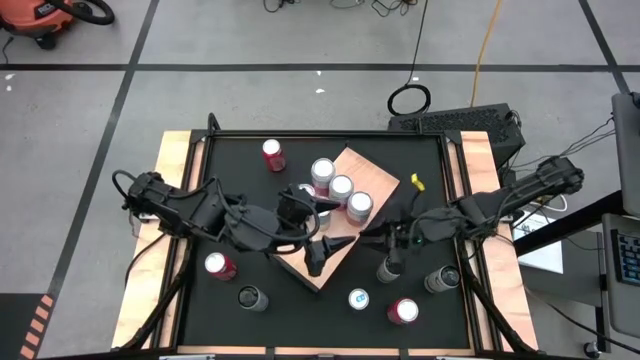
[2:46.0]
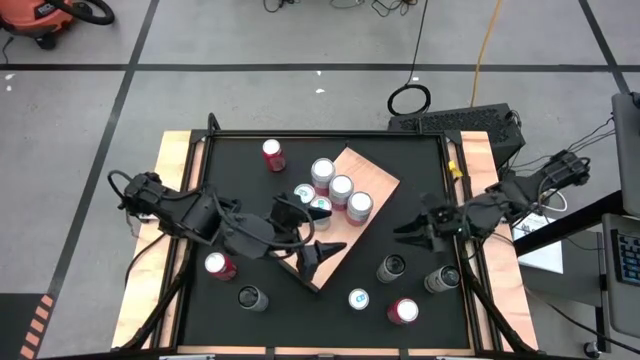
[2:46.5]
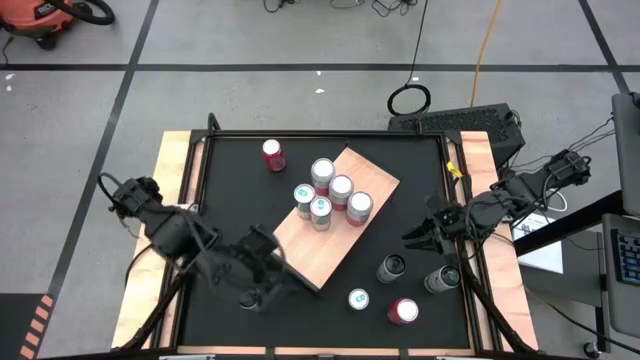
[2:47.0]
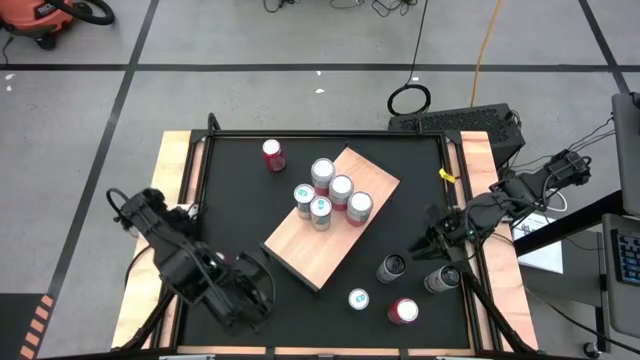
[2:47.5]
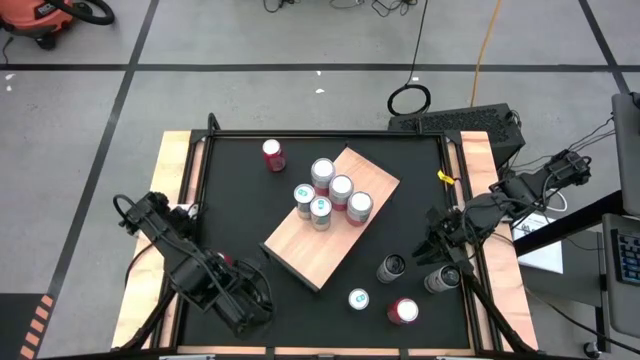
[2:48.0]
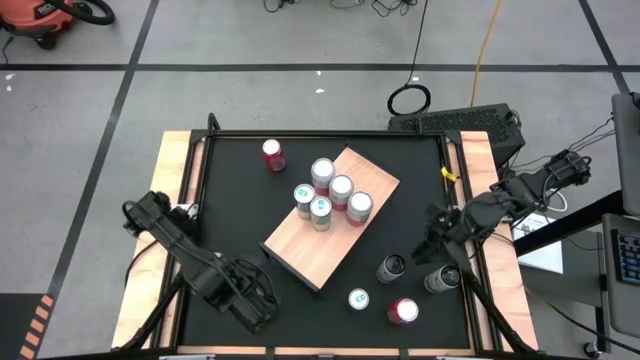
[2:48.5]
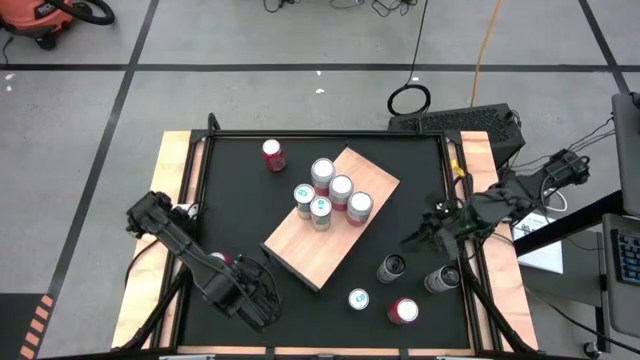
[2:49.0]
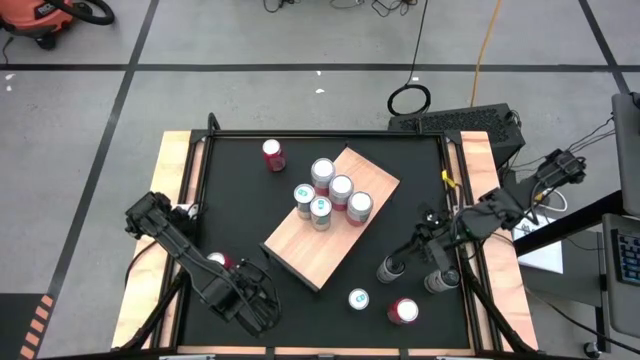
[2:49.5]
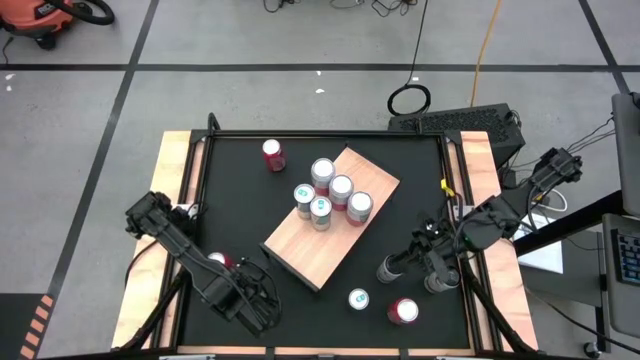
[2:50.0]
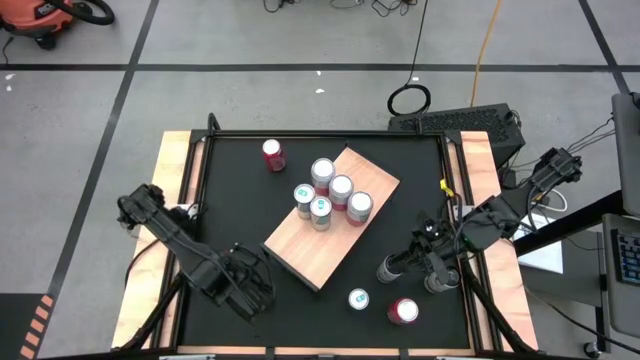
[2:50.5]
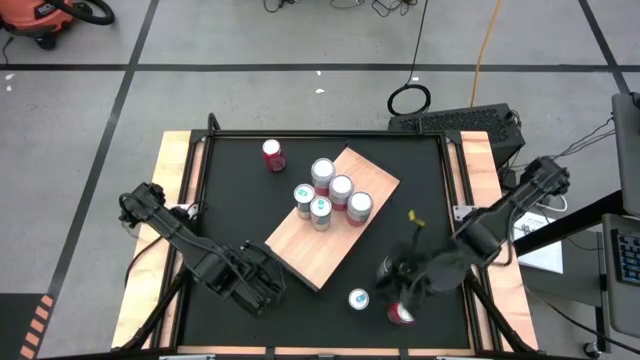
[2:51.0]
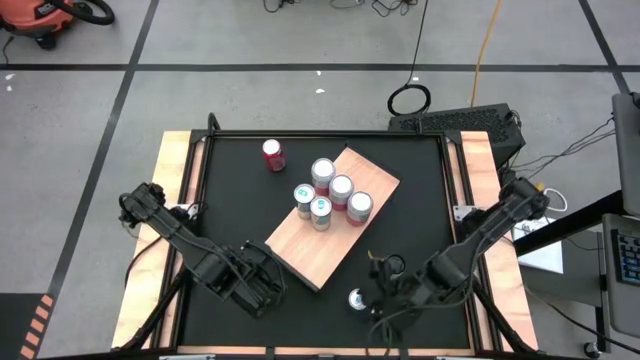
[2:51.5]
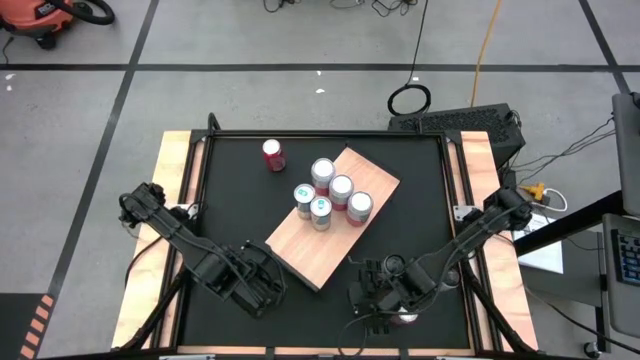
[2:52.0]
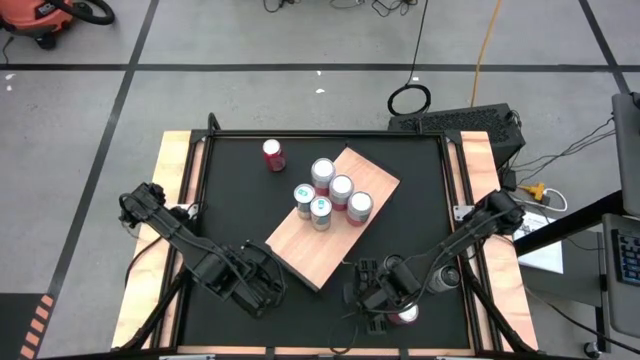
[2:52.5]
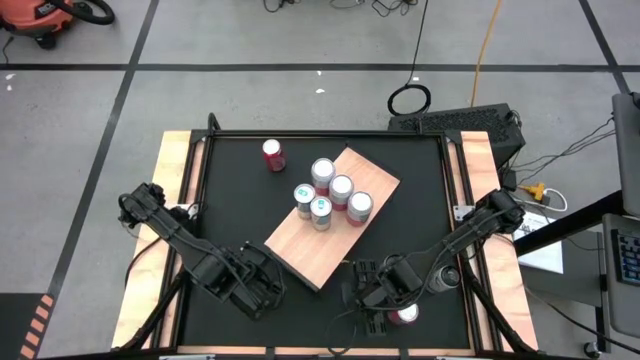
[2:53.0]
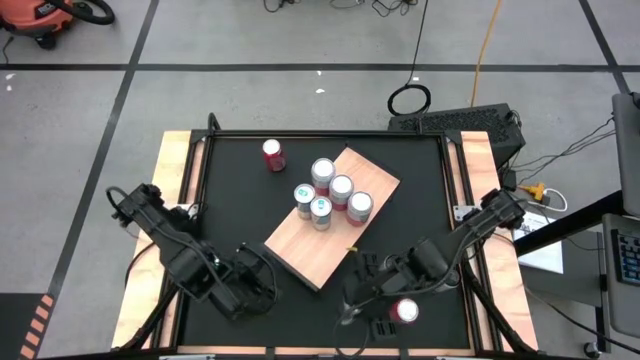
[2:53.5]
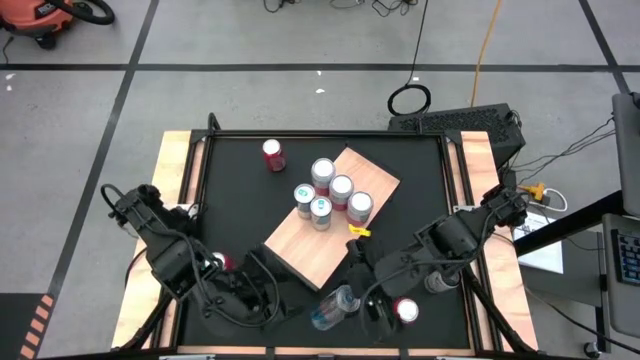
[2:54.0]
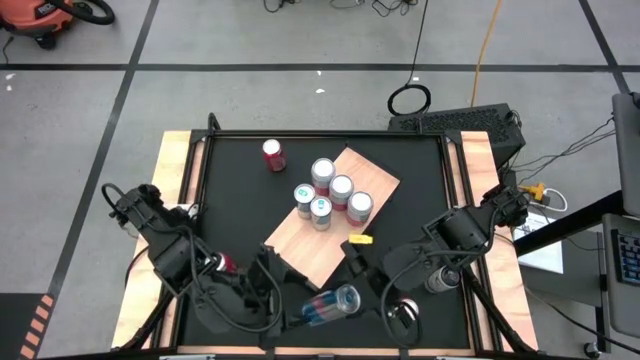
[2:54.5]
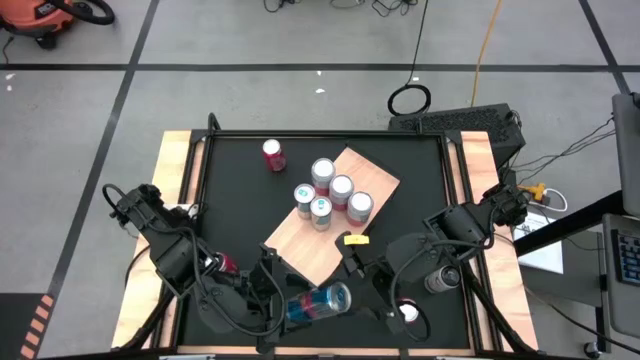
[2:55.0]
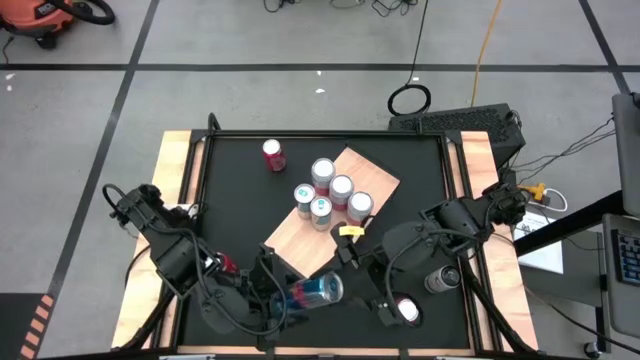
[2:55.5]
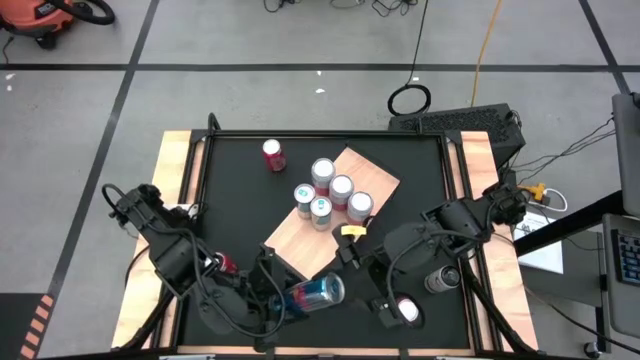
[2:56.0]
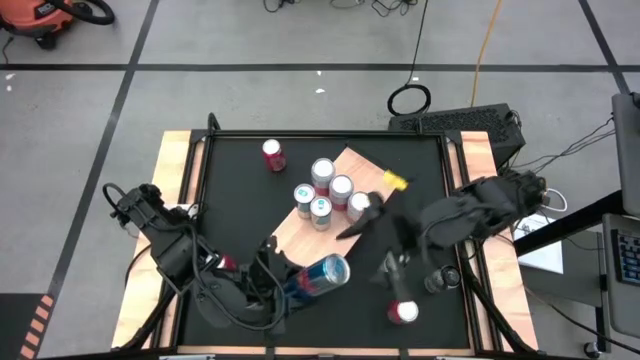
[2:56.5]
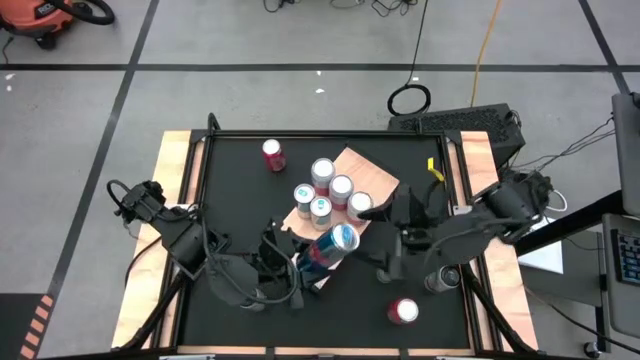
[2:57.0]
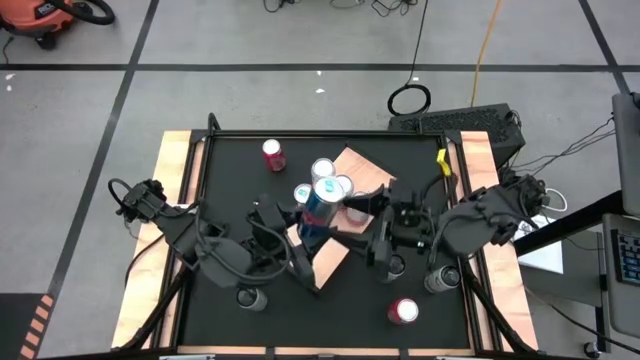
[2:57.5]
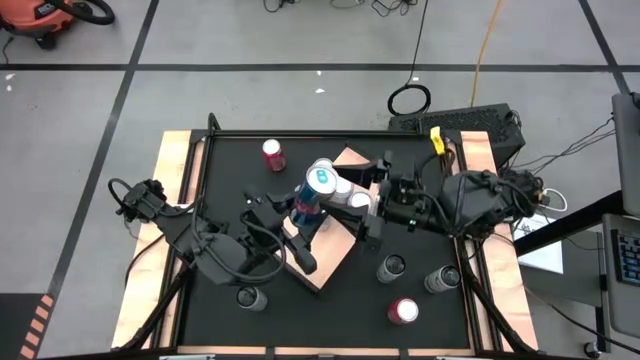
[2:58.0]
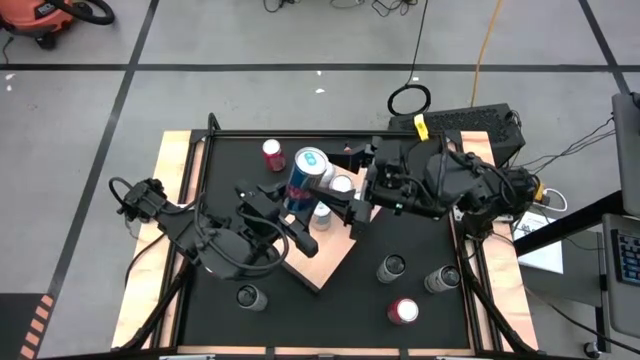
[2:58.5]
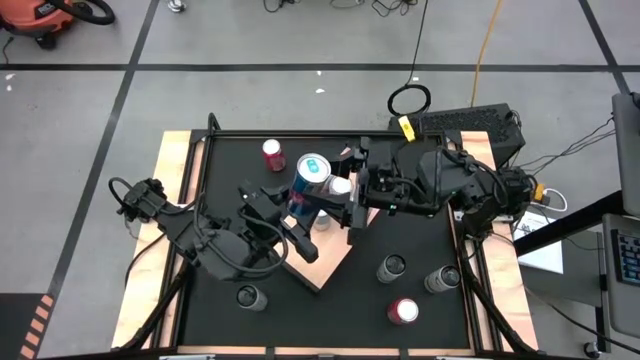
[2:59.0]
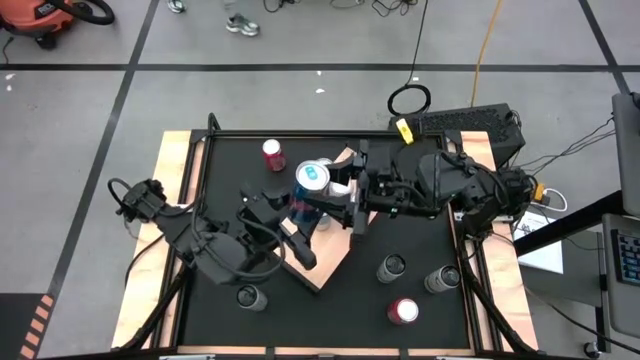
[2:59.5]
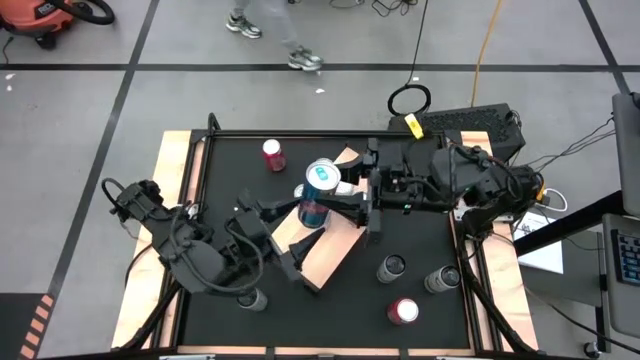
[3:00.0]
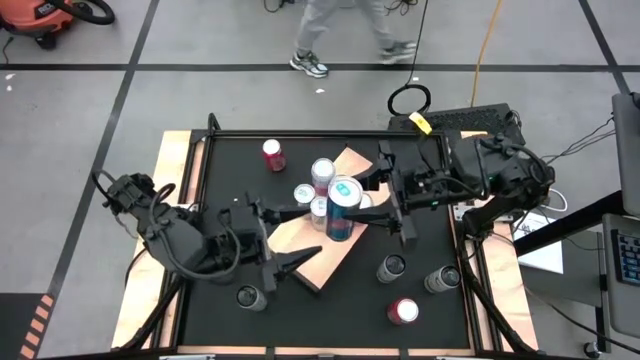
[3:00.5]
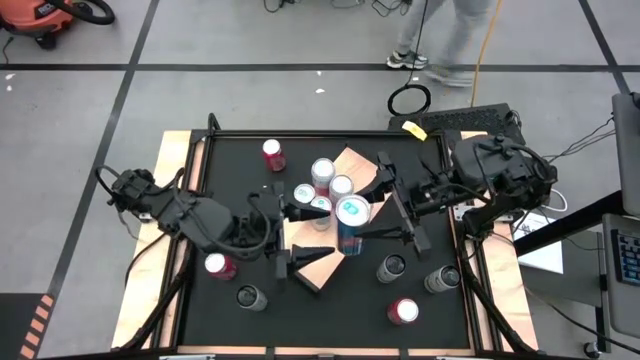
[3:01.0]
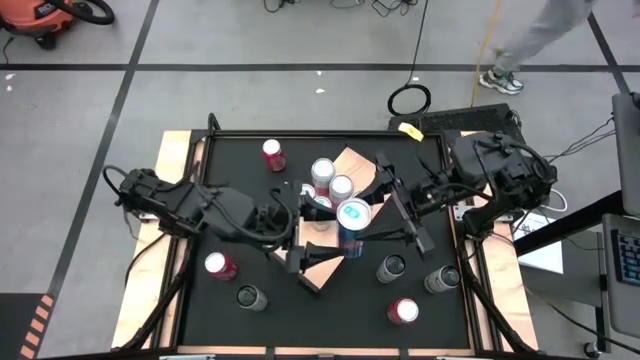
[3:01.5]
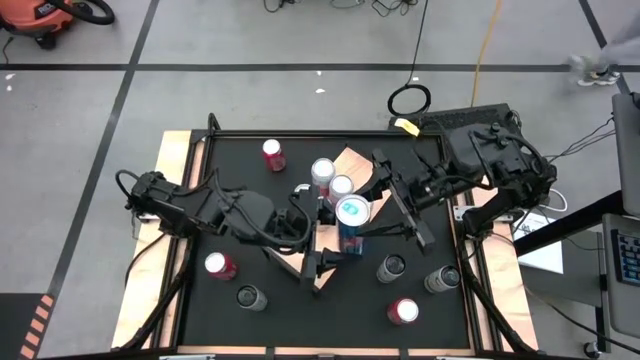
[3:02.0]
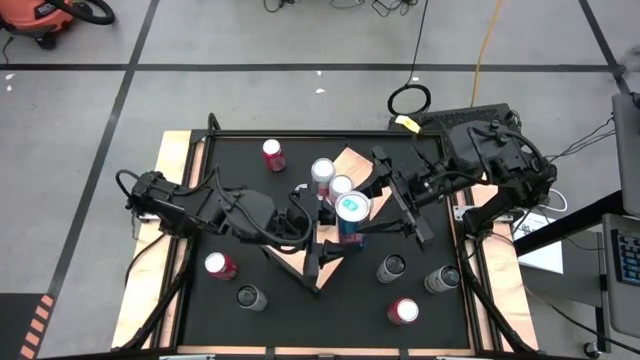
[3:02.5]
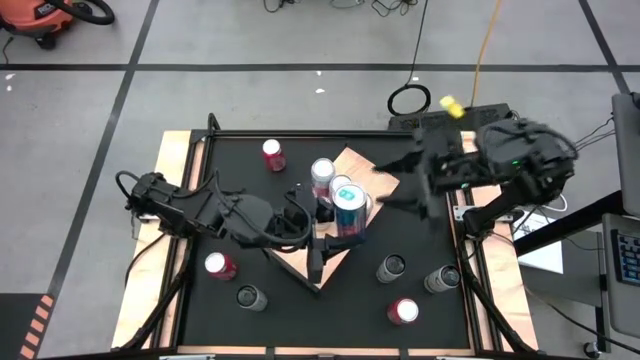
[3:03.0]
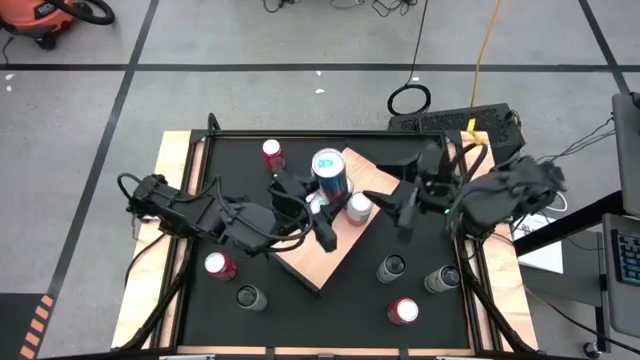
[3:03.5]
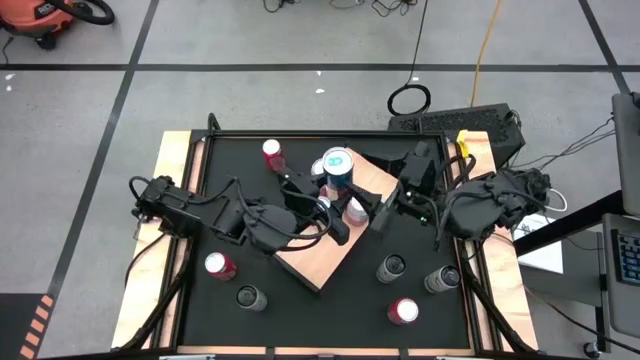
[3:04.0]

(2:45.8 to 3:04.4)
Task: Place canned beverage on shelf
Put the blue soda can on the shelf aligned with the blue soda can

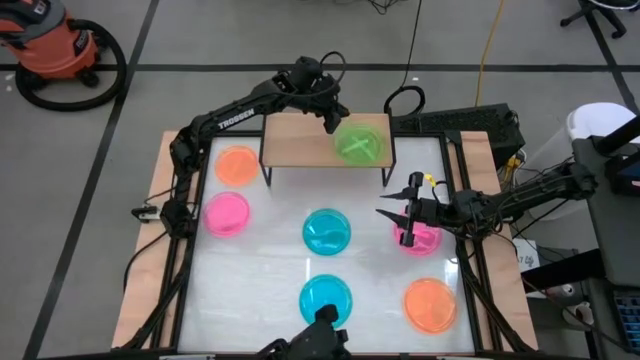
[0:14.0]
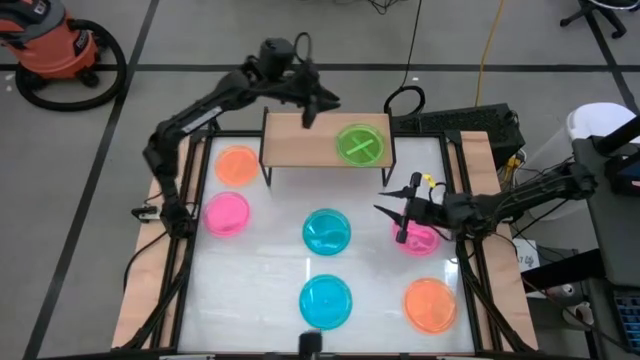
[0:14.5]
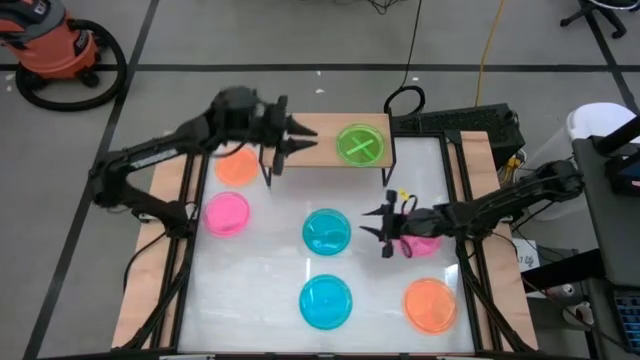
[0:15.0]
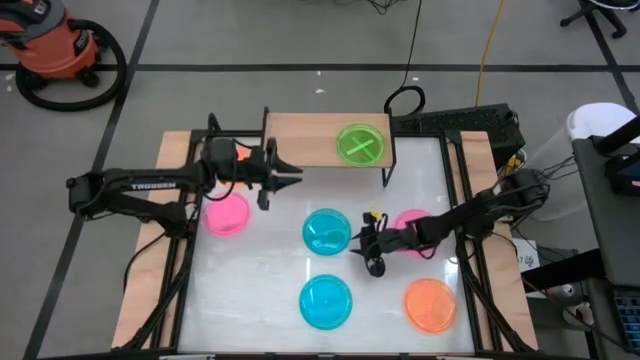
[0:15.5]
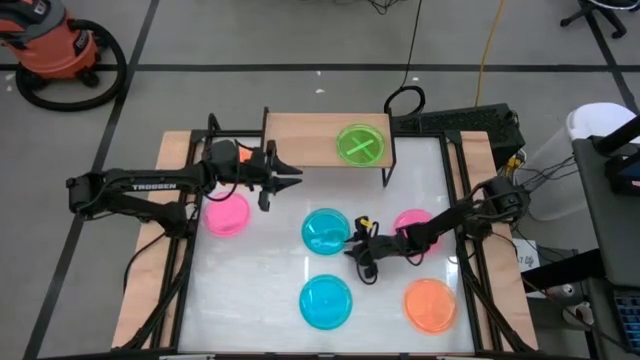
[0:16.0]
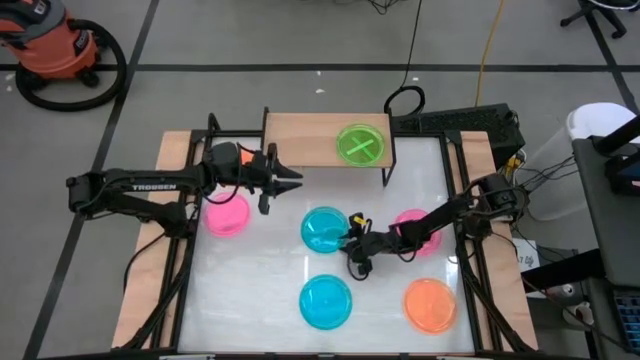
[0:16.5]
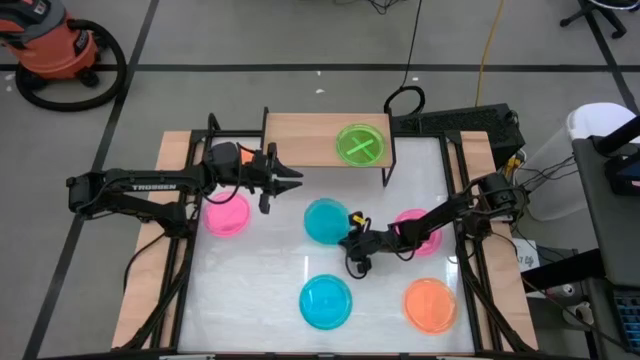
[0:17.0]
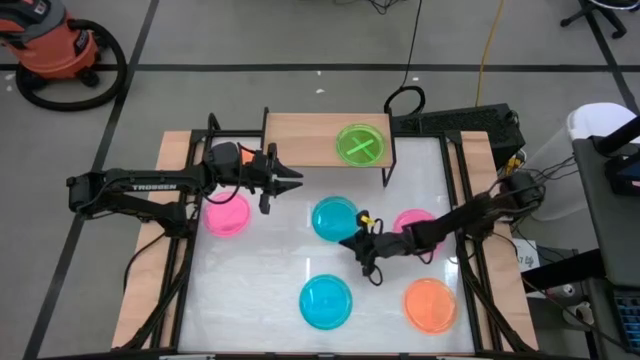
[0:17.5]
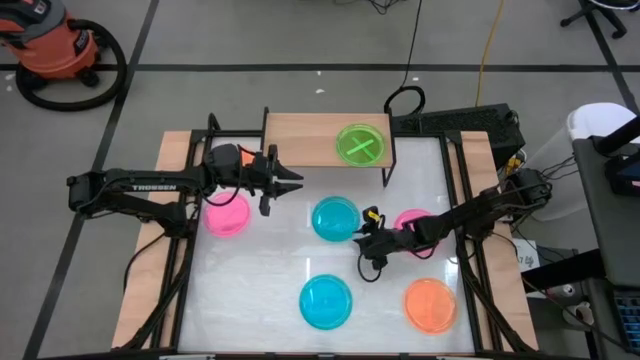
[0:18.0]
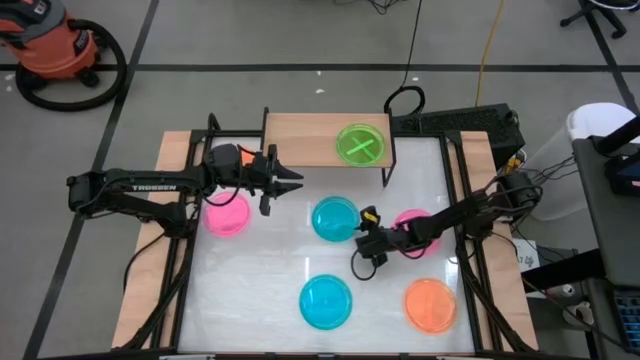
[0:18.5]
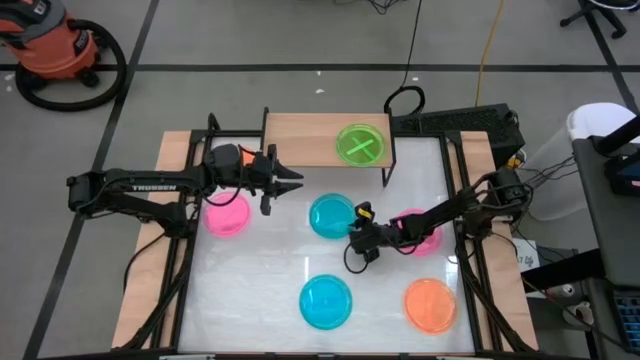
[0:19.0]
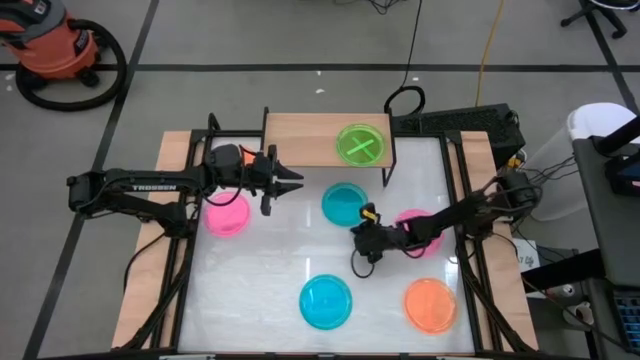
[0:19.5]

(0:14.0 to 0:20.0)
Task: Place and stack plates onto a shelf
Stack the top blue plate on top of the green plate on the shelf
